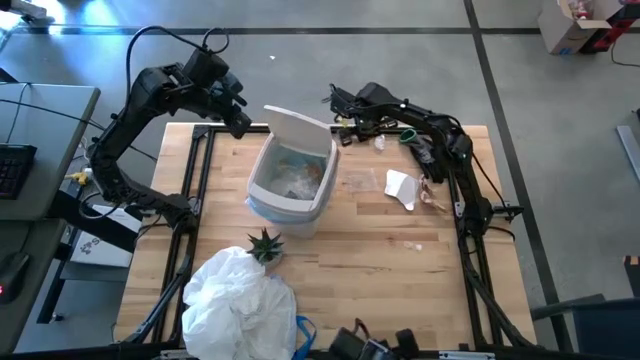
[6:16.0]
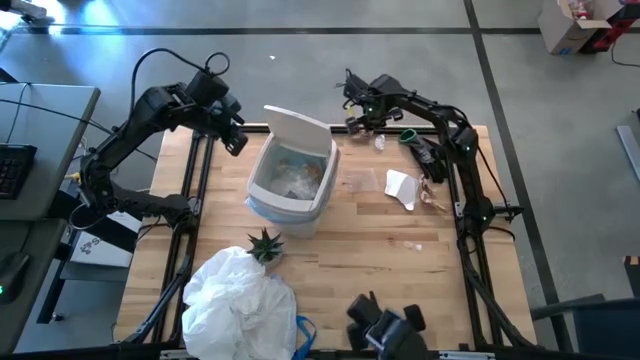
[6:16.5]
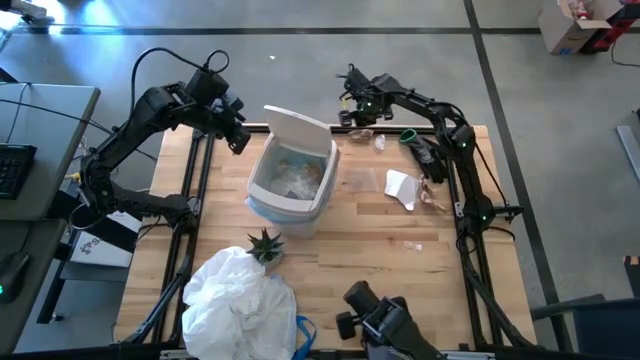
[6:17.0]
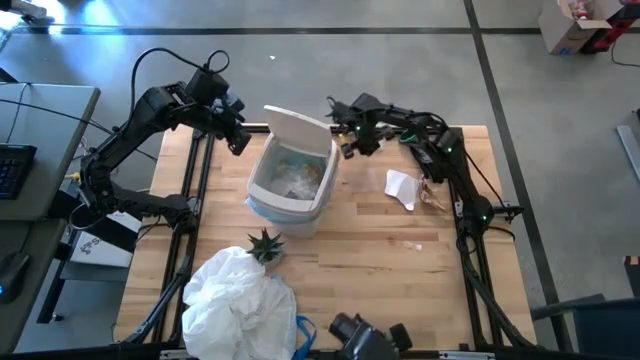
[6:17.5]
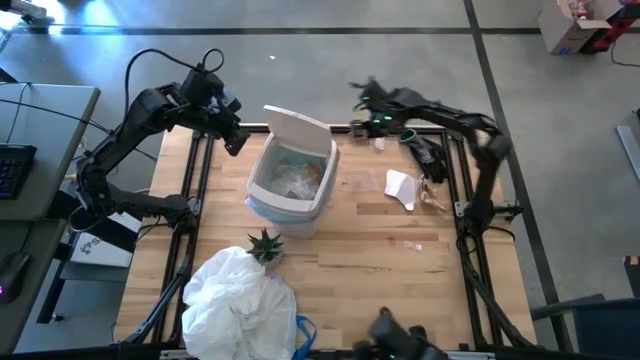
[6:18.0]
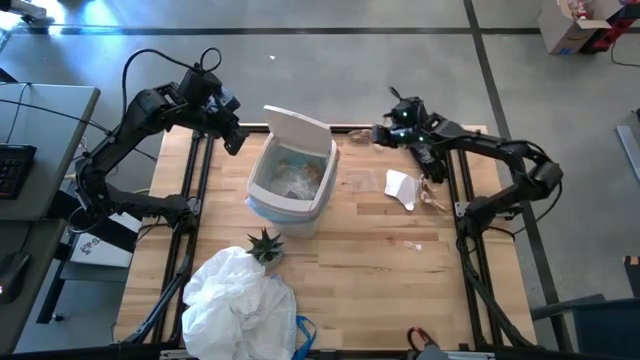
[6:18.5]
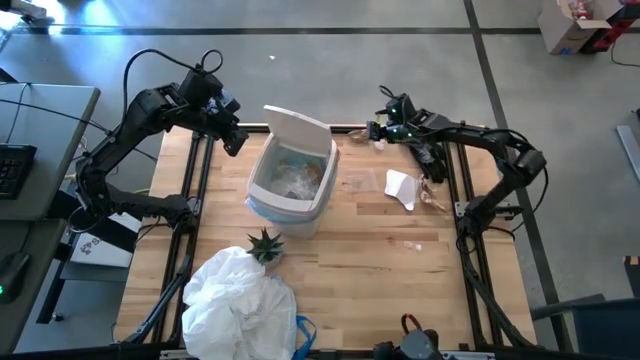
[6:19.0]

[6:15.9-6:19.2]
Task: place trash/remove bag and relplace
Put the brown napkin into the trash bin

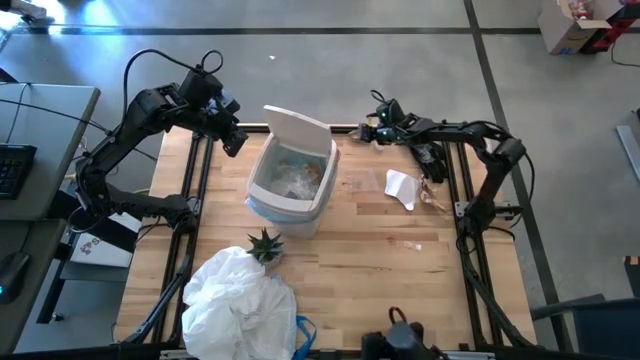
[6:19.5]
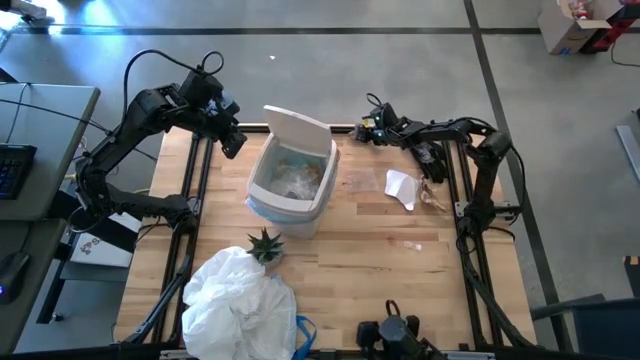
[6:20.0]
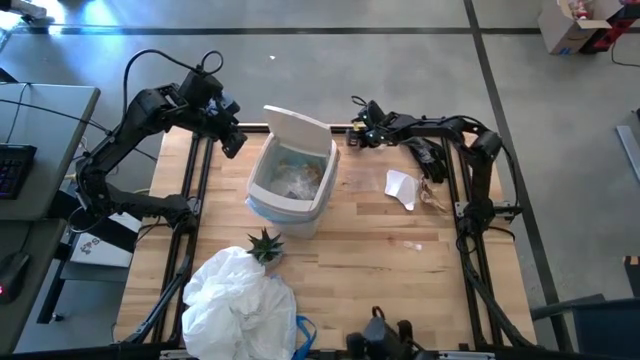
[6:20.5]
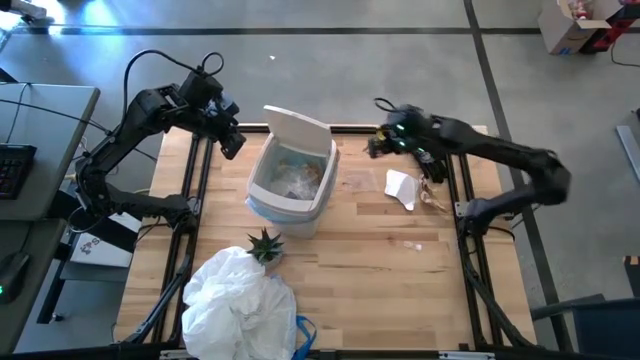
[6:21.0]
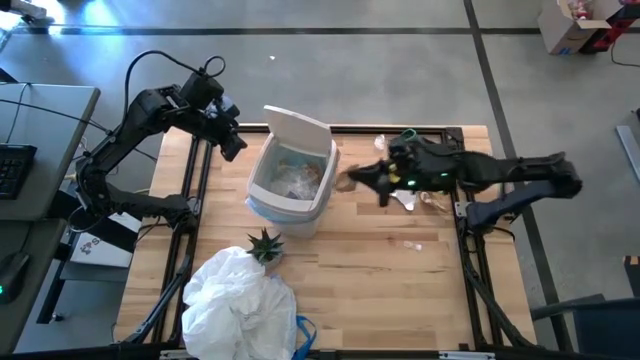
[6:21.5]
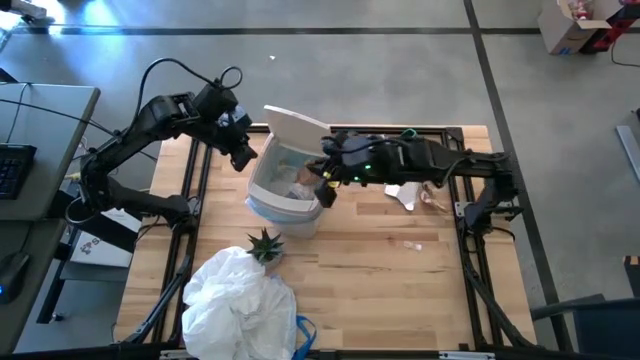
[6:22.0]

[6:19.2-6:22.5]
Put the brown napkin into the trash bin

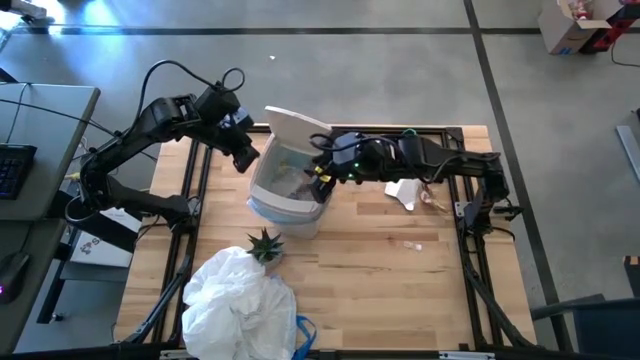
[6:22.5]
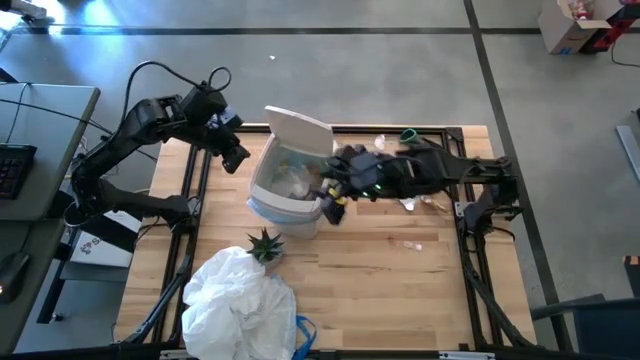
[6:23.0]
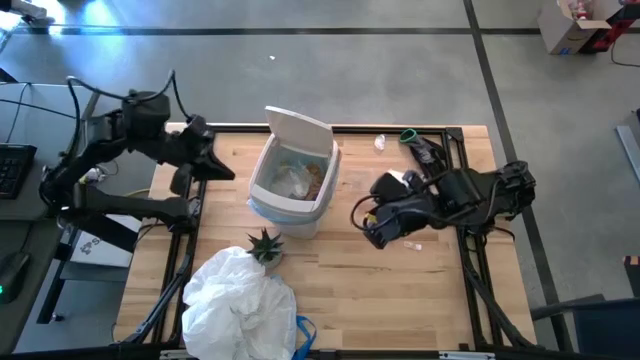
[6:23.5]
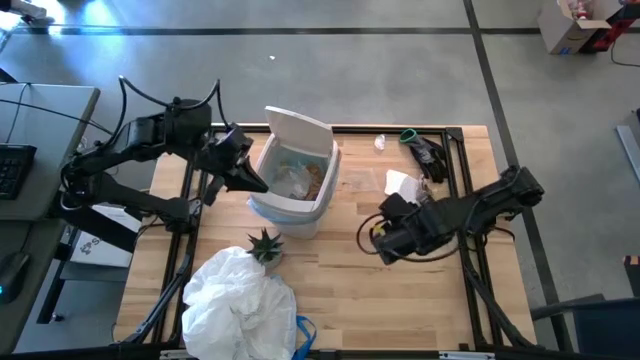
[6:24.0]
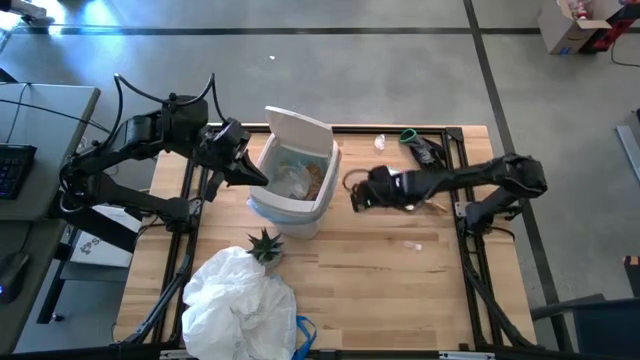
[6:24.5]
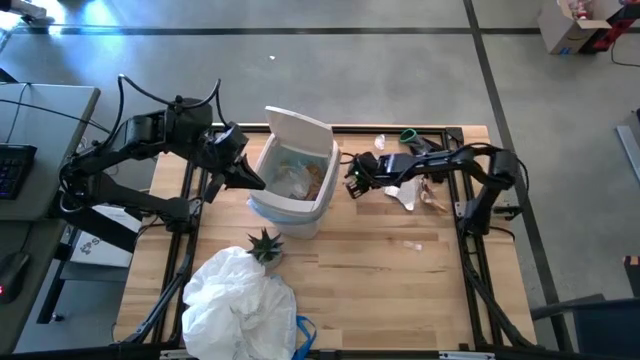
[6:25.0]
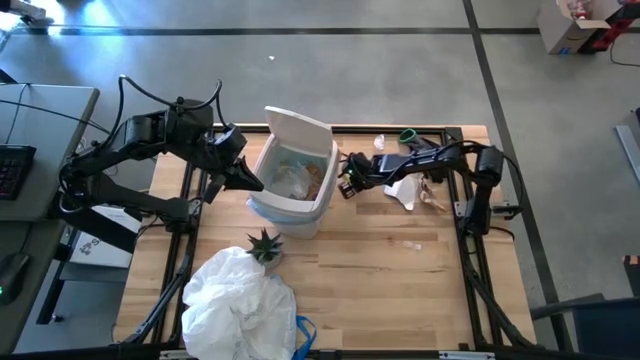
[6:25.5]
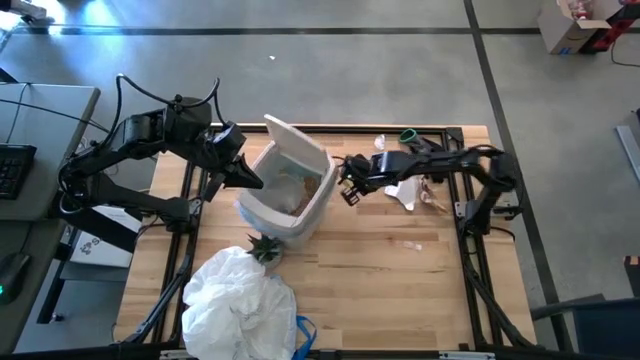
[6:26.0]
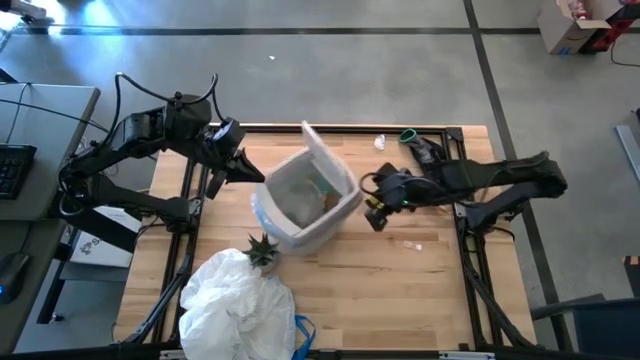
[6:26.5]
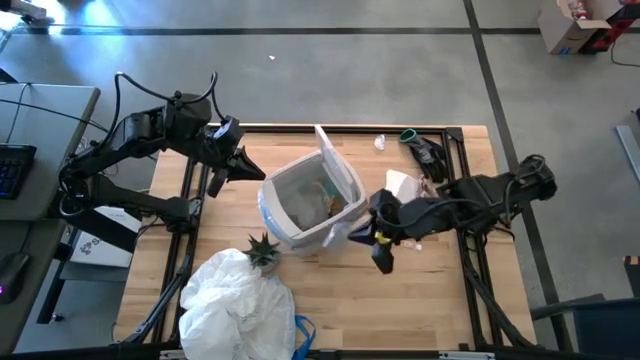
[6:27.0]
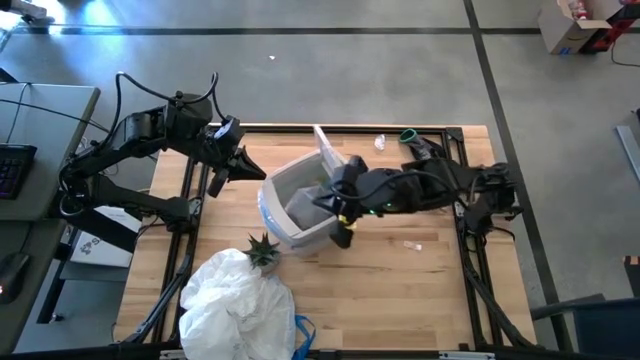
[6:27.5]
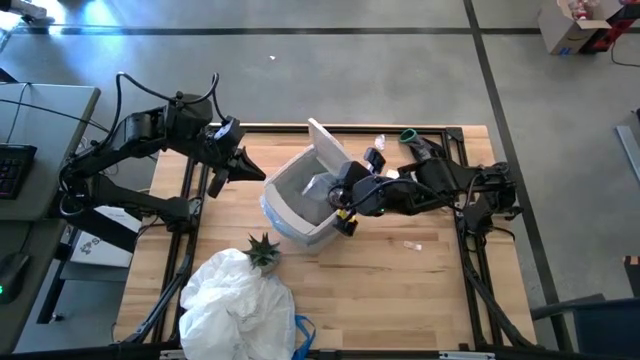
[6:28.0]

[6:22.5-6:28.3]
Put the transparent plastic into the trash bin

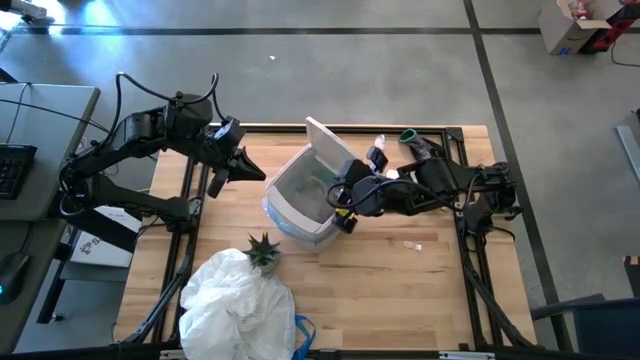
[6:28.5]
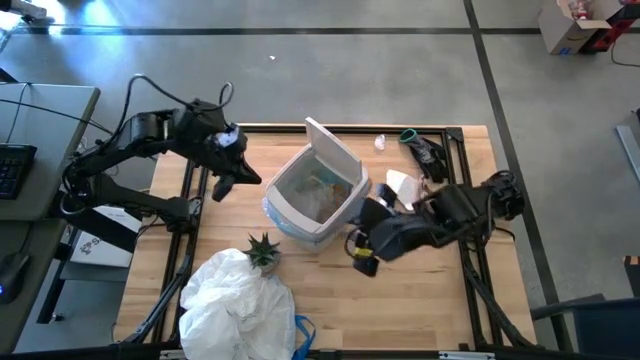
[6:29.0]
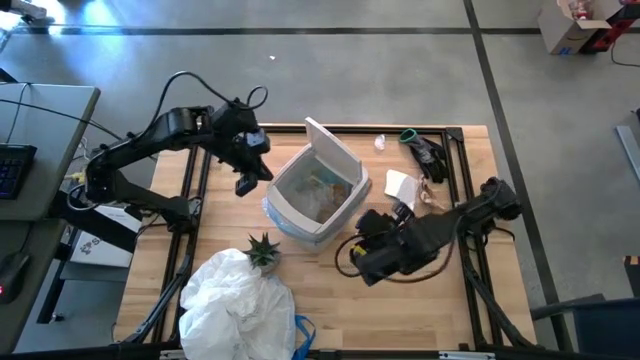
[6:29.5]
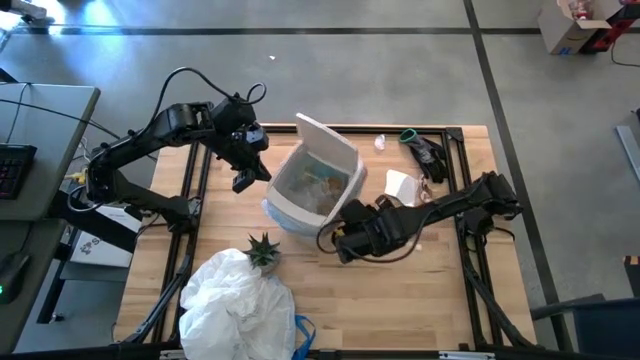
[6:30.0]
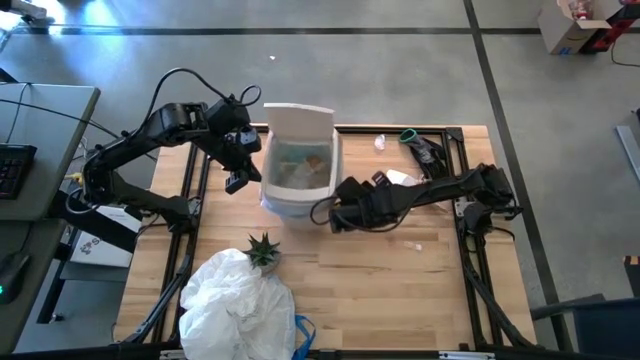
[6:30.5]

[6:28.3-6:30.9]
Adjust the trash bin

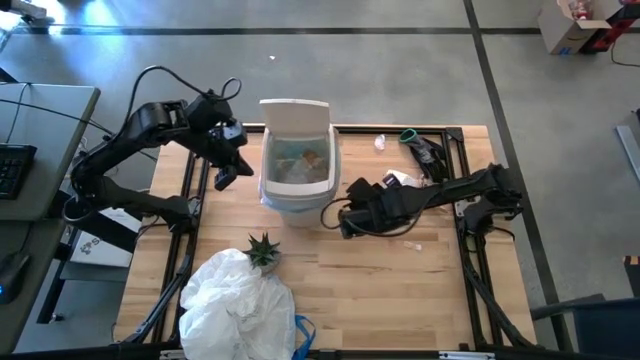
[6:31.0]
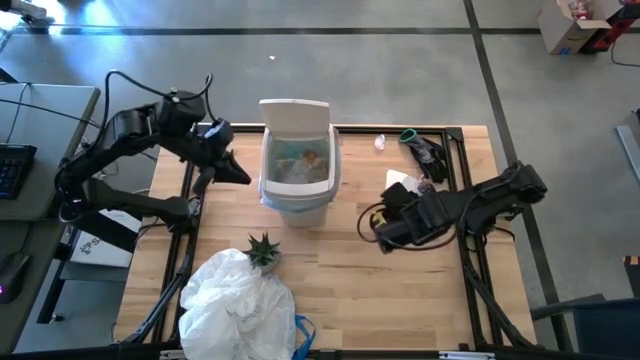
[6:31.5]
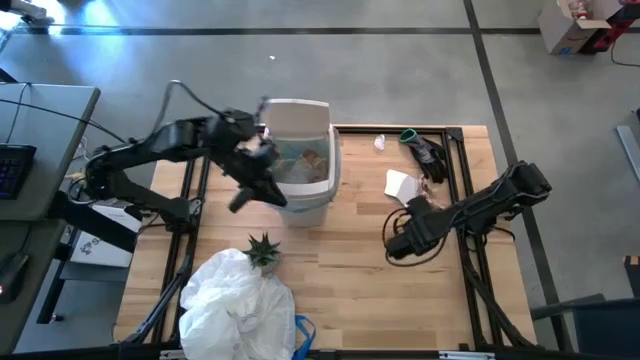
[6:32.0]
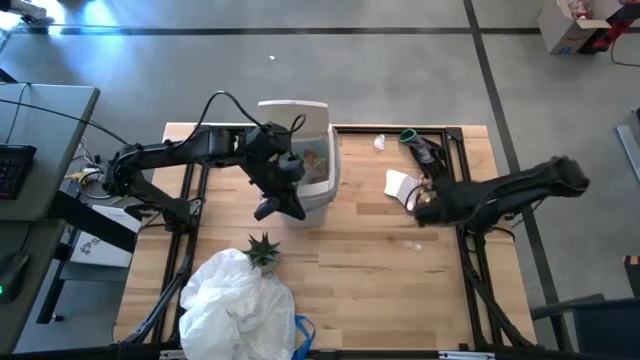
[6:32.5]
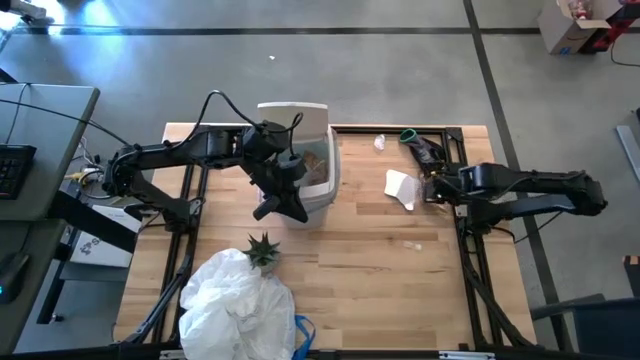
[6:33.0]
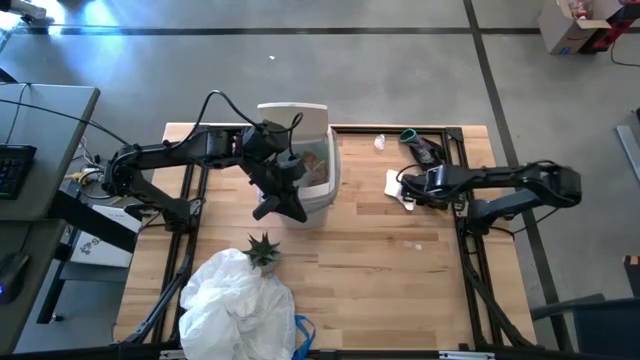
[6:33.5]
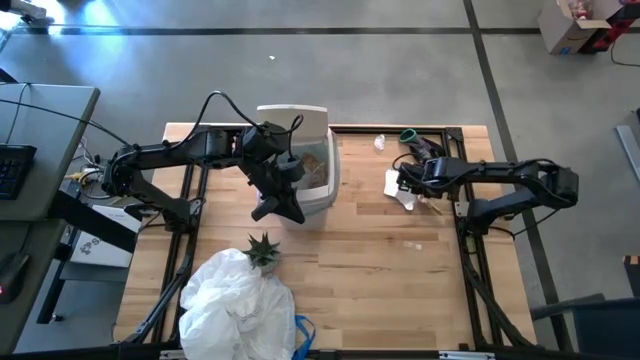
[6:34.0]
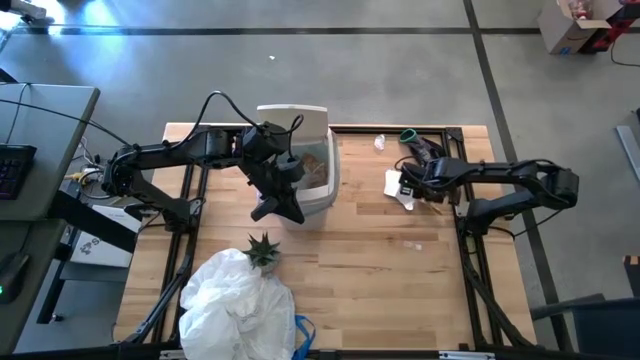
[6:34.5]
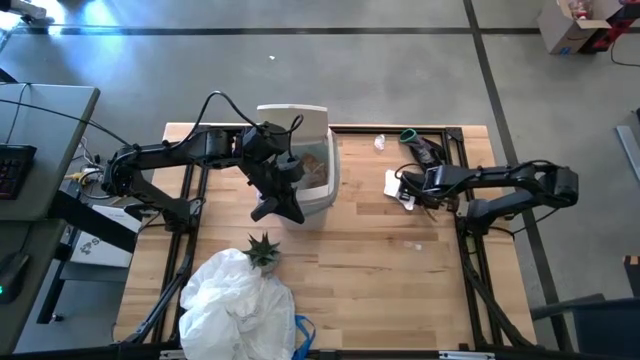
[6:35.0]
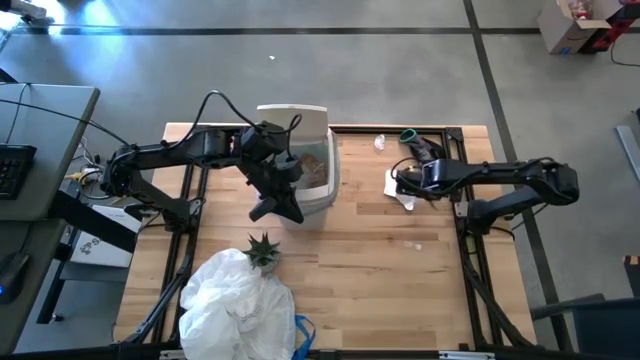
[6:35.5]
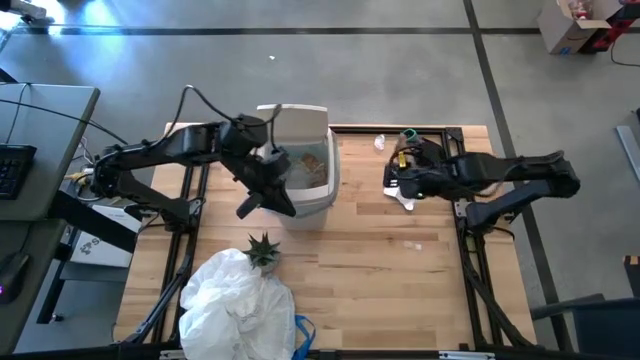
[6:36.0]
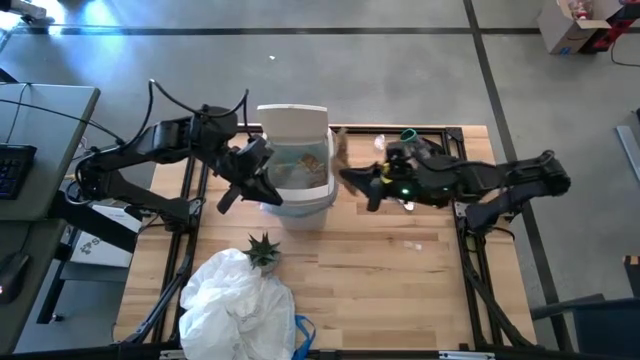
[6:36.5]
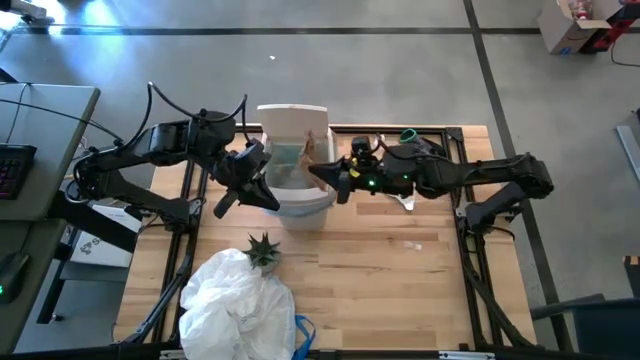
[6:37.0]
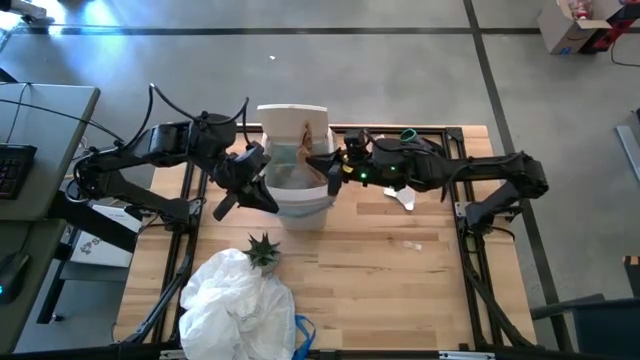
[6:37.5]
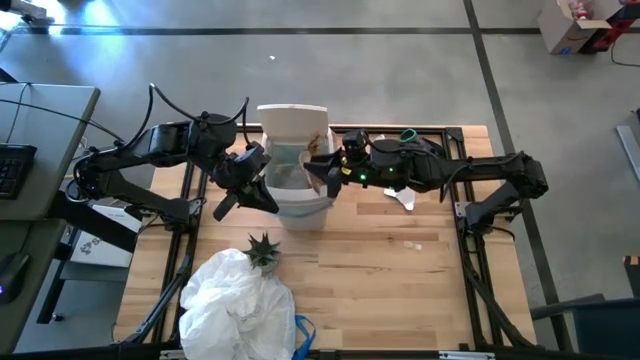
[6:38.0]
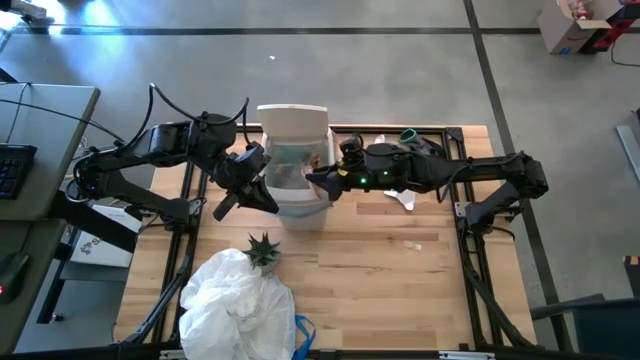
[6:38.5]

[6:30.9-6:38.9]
Put the brown napkin into the trash bin
